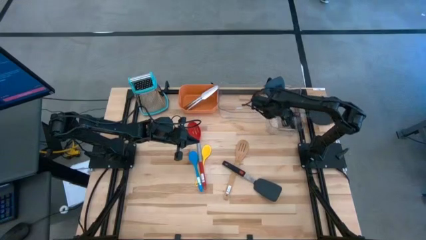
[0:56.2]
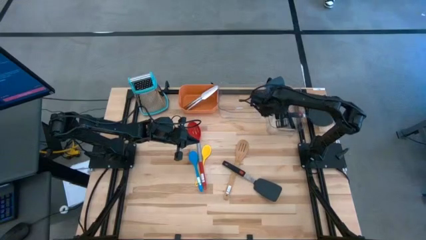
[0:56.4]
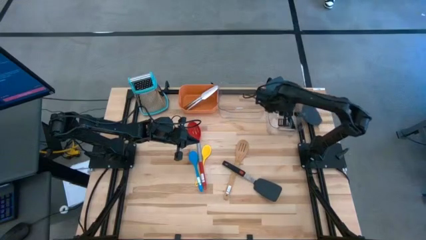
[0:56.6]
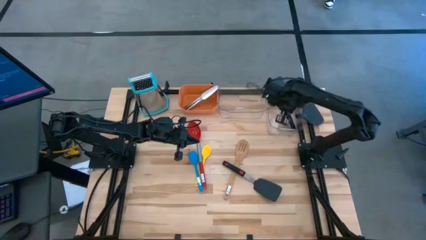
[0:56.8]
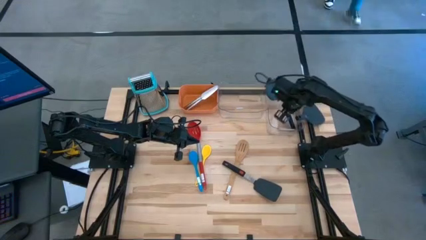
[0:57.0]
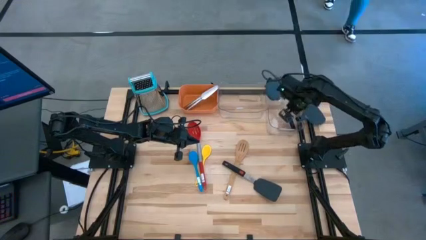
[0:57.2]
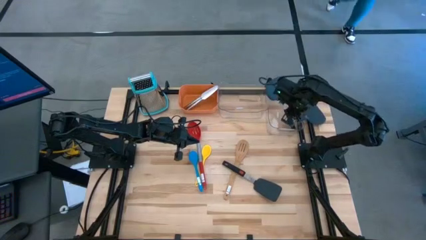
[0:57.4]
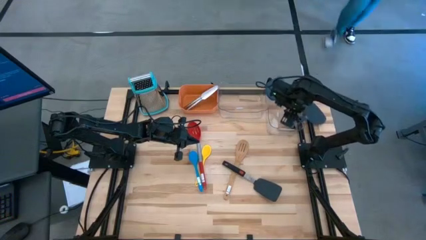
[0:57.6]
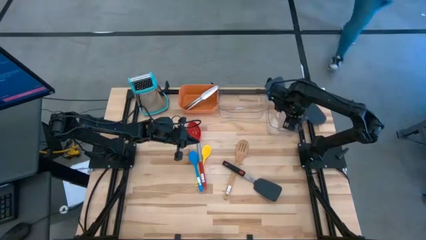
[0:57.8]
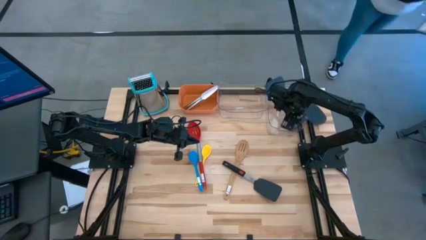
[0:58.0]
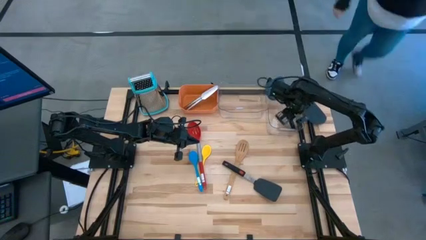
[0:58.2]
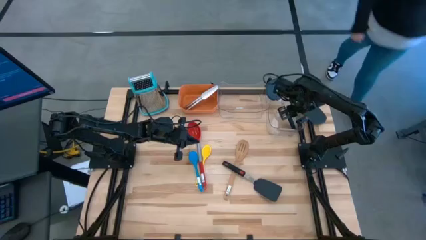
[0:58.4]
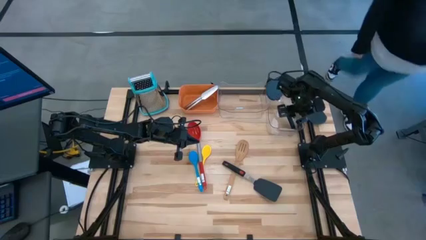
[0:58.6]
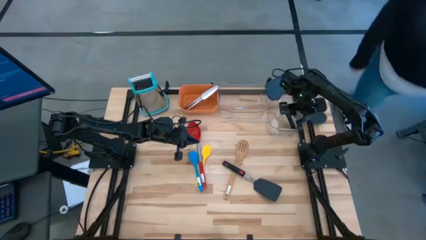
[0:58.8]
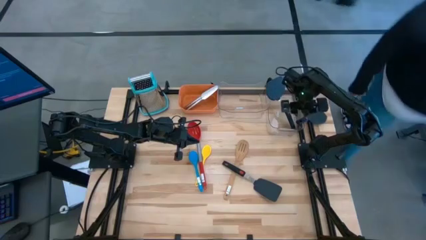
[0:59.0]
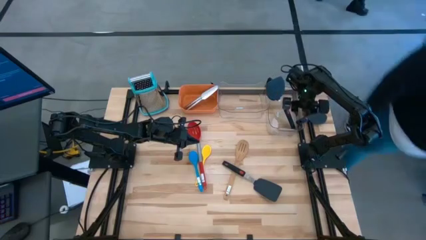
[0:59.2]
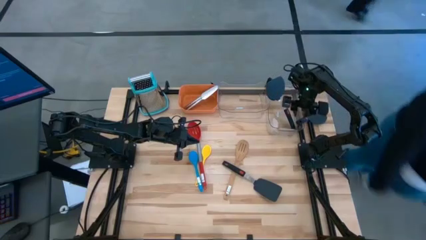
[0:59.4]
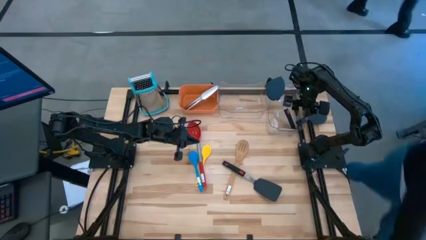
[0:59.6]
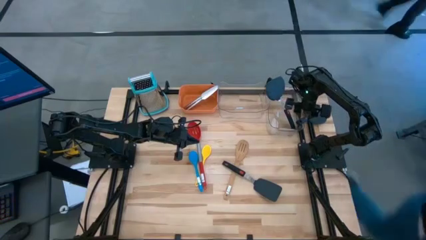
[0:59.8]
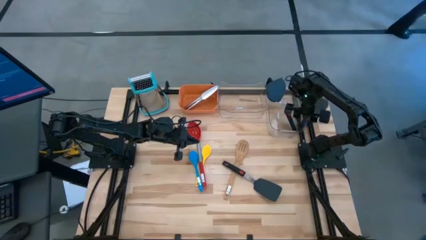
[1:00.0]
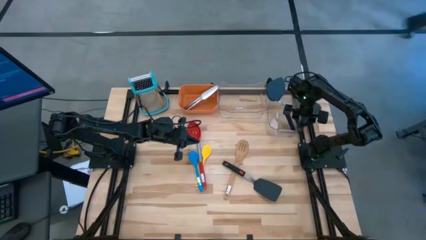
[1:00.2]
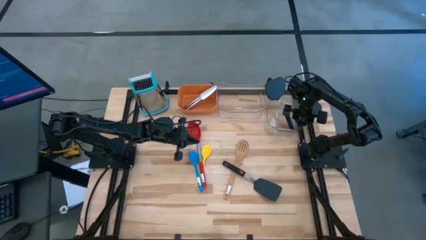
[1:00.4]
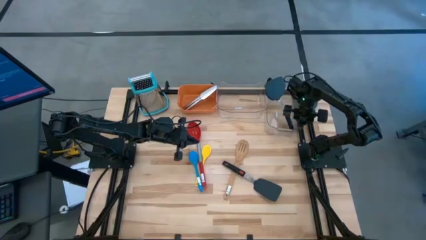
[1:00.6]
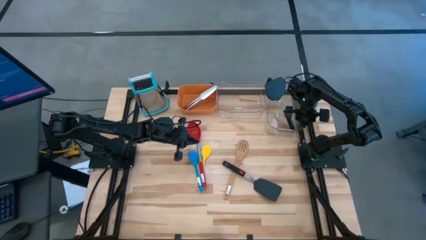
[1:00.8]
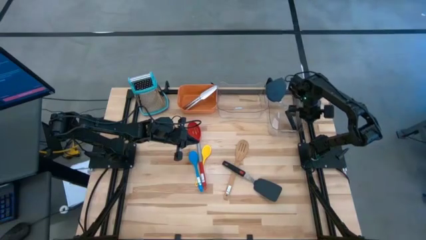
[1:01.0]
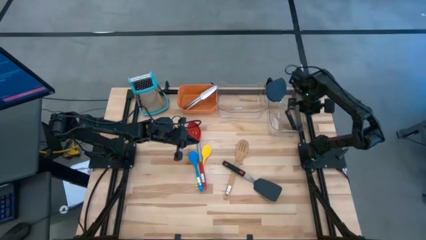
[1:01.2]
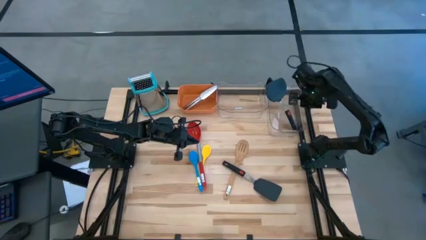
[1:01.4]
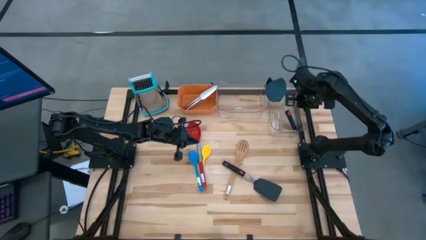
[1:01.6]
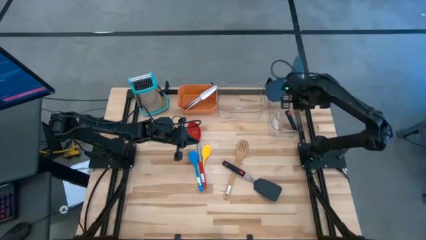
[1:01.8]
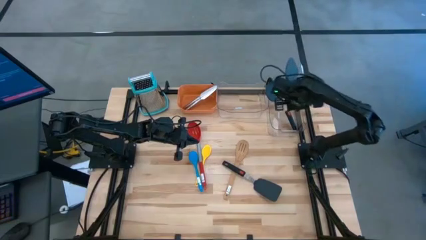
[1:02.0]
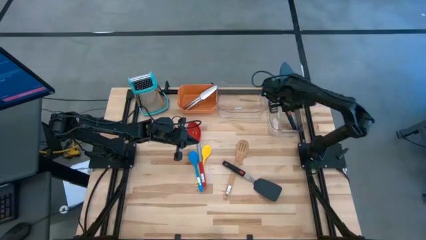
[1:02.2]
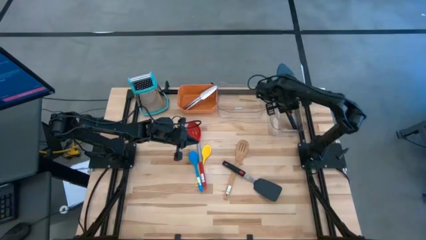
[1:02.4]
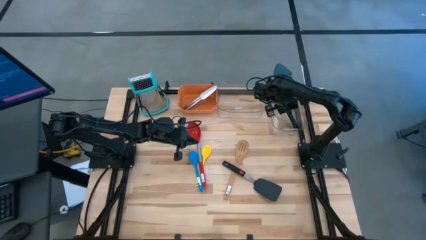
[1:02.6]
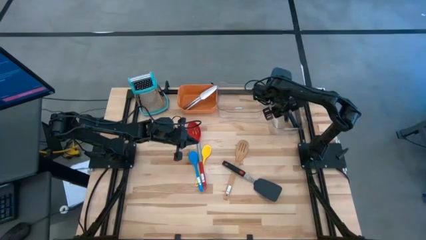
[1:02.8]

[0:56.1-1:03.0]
Task: Pick & Place Kitchen Items
Put the black spatula into the right transparent bin

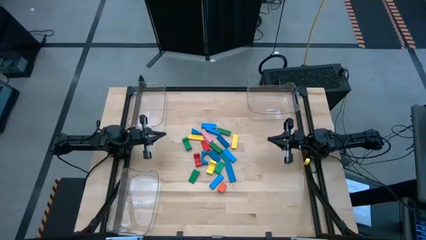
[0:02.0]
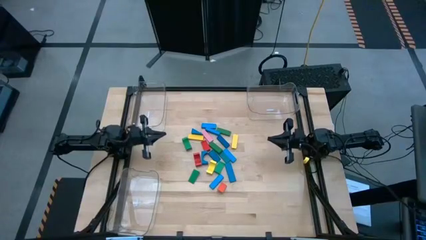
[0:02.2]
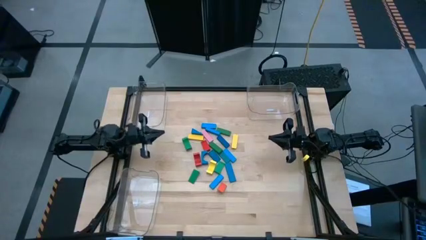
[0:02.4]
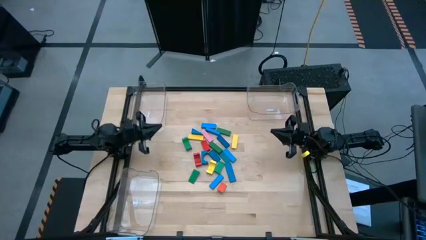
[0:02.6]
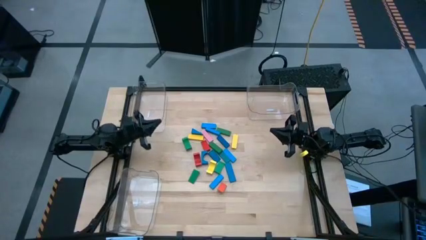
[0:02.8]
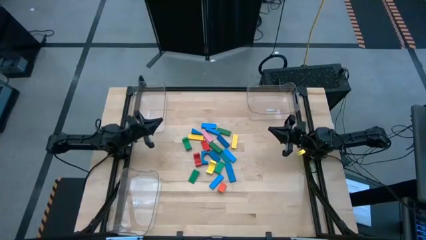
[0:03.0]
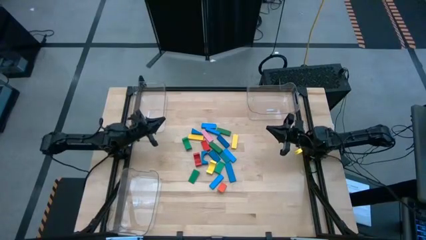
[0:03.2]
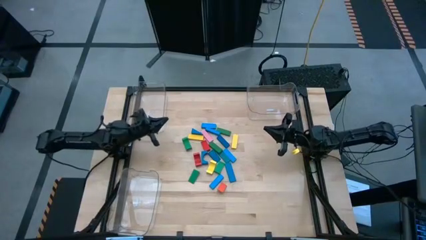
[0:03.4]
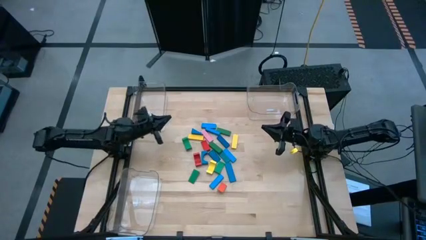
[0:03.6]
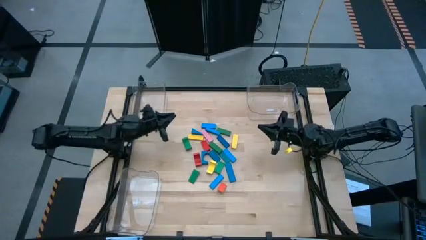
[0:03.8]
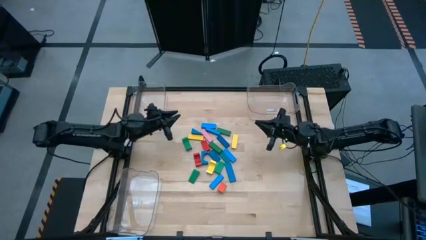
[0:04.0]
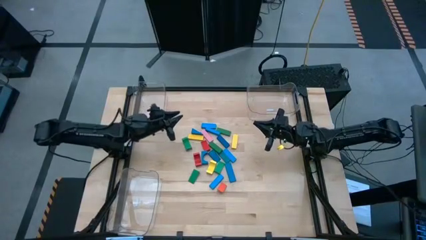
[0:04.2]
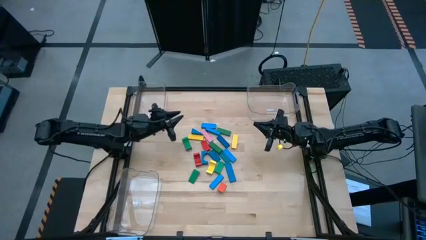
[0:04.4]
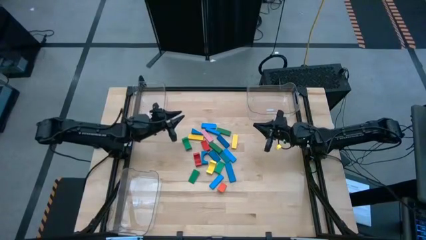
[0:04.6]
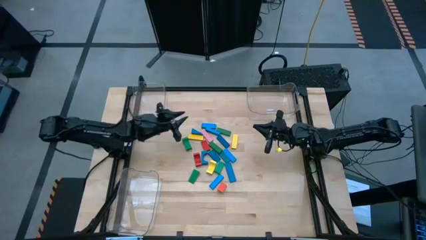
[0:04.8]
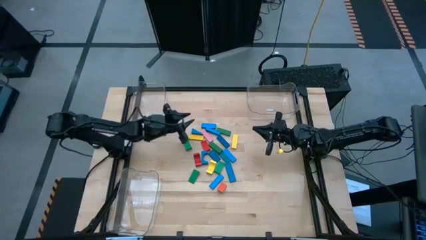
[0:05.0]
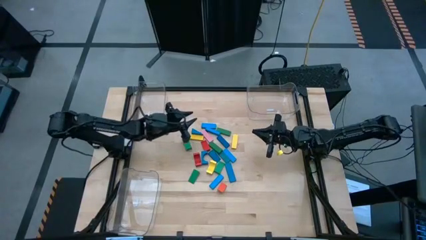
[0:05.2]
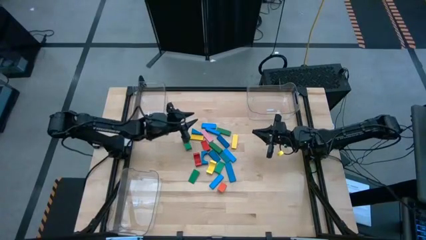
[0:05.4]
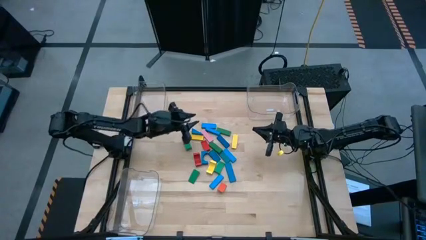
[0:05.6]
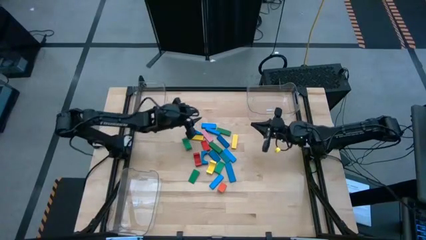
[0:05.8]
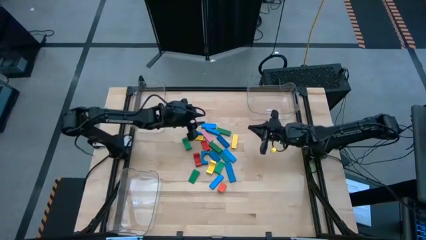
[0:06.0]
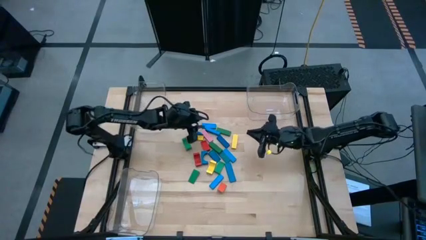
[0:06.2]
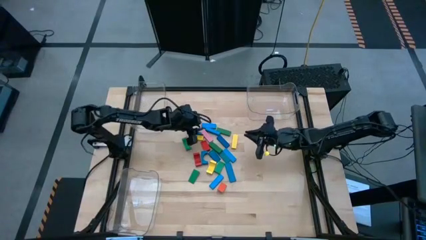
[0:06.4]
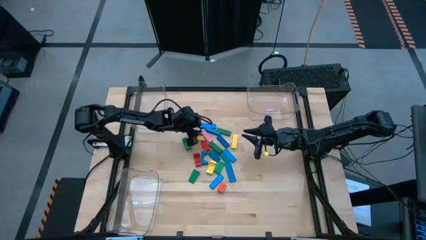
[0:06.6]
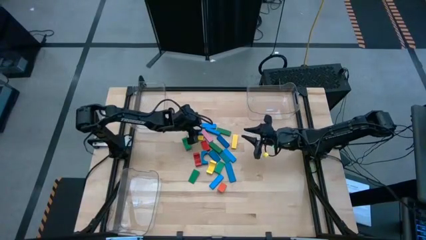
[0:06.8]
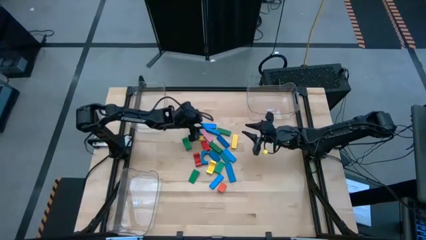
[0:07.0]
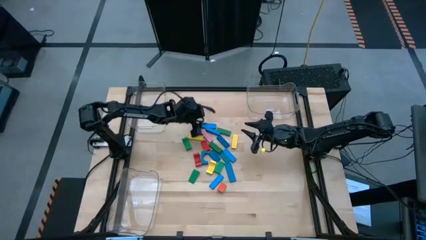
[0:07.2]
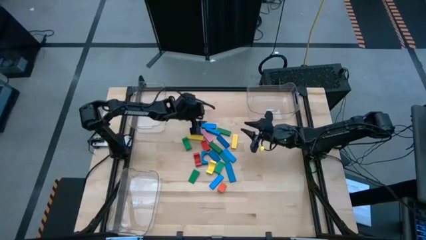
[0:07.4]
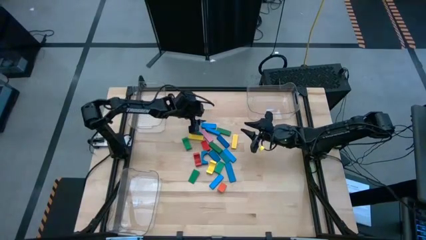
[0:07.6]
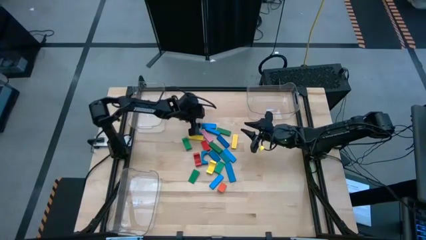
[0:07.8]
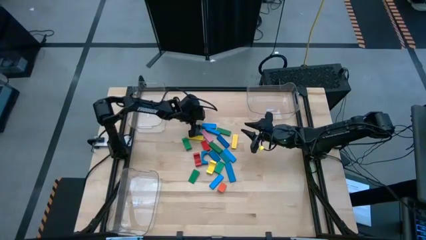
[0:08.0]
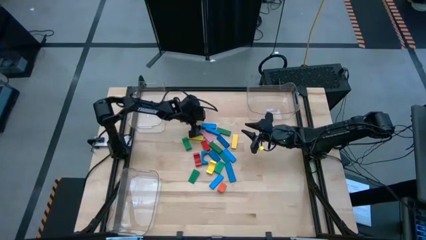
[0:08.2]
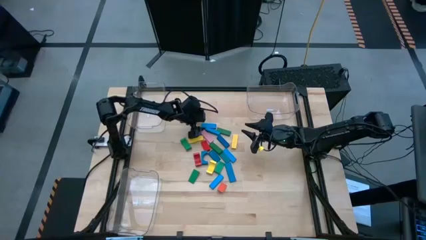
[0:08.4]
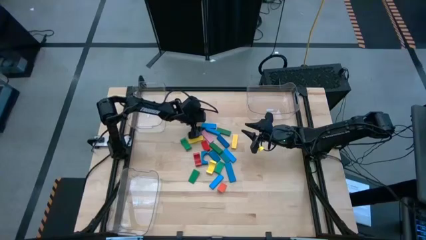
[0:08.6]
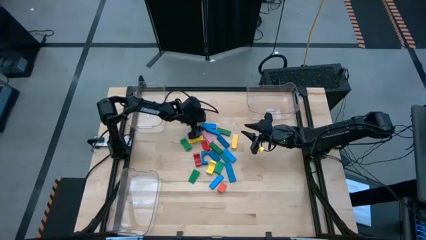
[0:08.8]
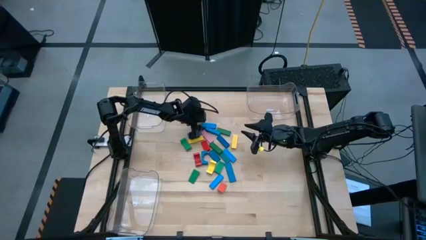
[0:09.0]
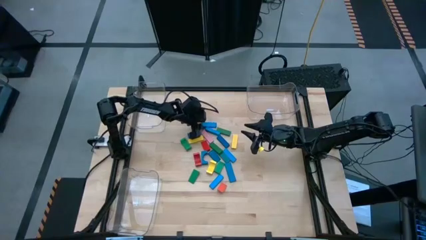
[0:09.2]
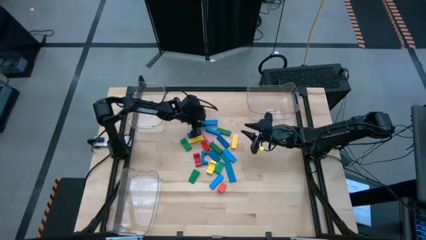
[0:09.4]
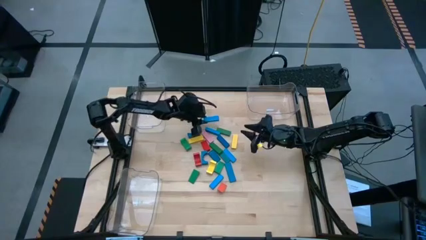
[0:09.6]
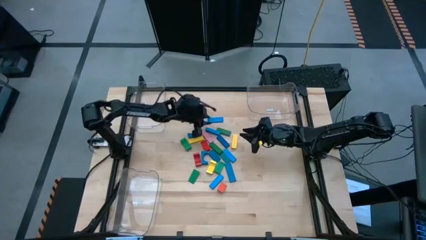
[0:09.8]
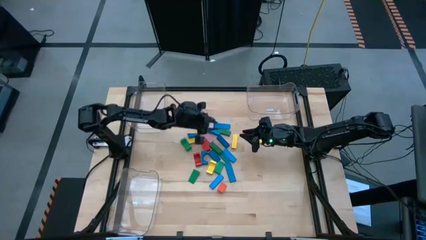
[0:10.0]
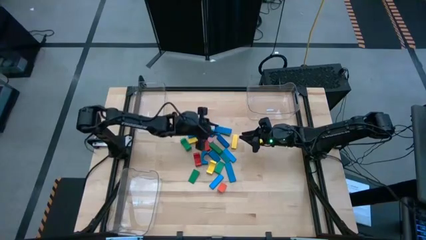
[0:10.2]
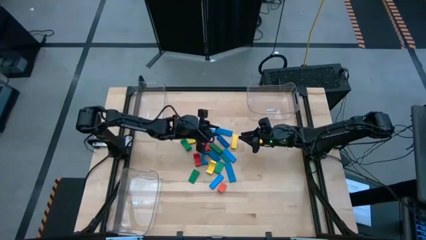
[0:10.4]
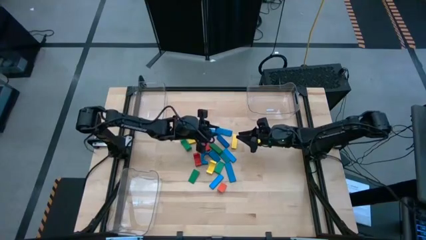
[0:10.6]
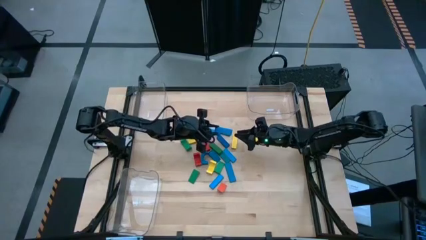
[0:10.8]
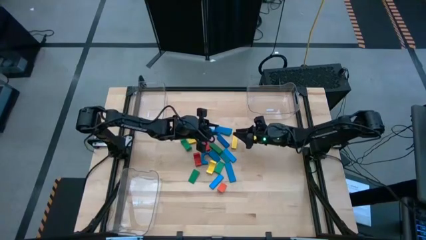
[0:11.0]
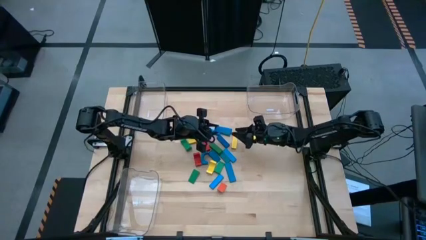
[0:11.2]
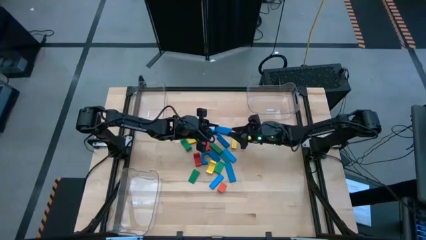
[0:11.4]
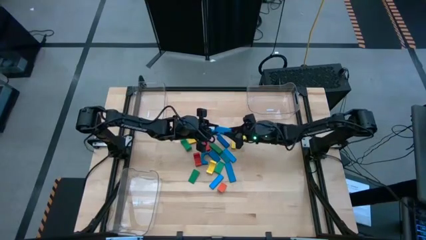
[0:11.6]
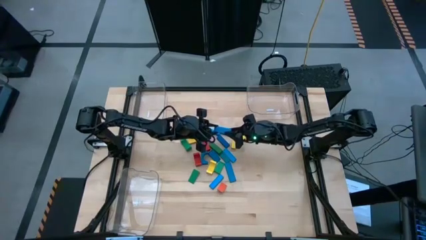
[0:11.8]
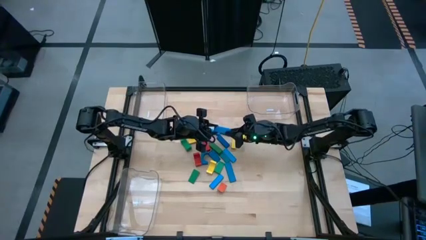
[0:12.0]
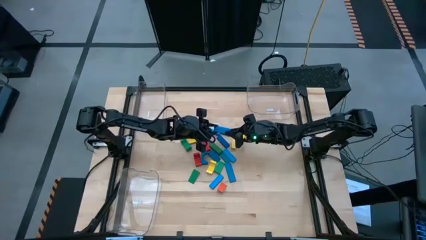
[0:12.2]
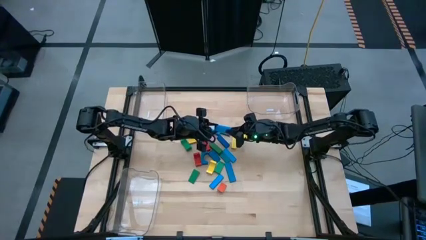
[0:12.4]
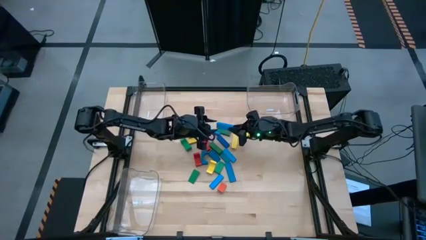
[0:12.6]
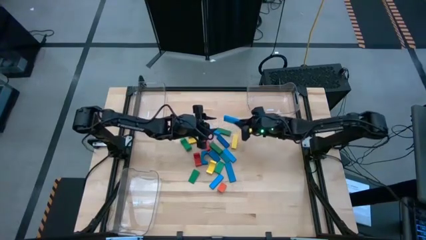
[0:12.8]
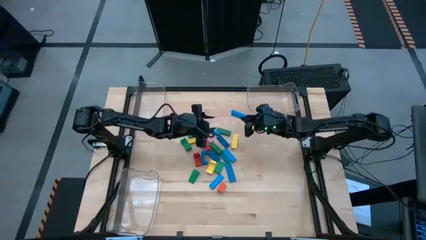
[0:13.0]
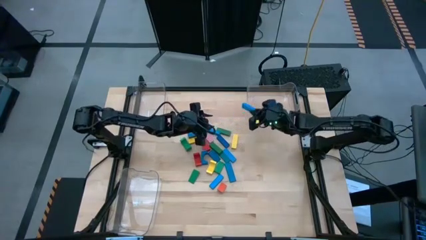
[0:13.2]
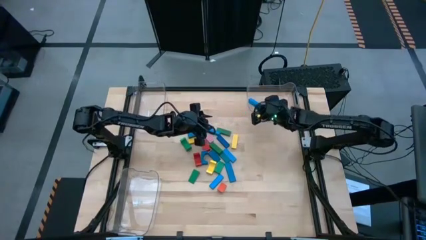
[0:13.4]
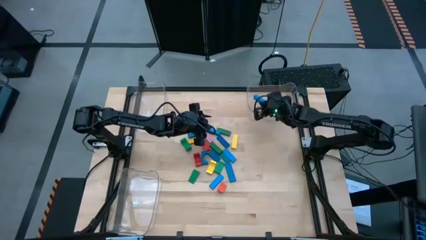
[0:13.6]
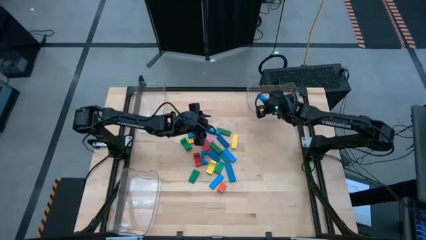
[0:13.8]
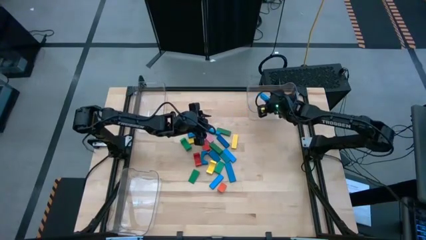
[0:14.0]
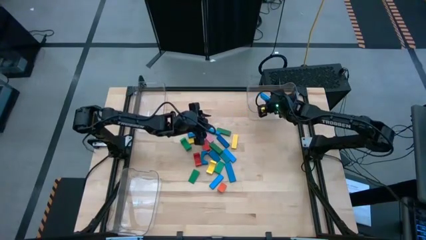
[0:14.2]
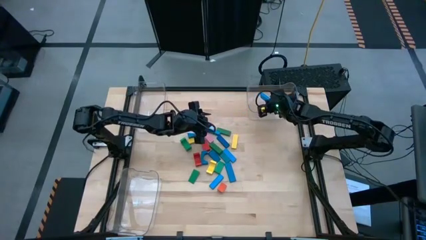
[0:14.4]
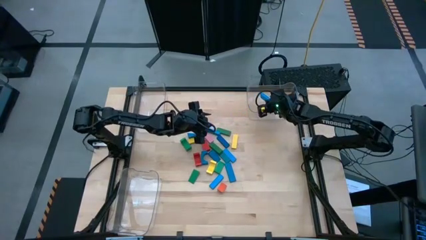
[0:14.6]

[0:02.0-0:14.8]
Task: Sort blocks by size
Put the blue rectangular block into the top right transparent bin
